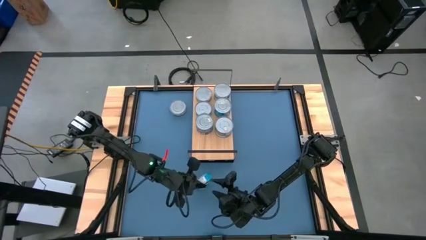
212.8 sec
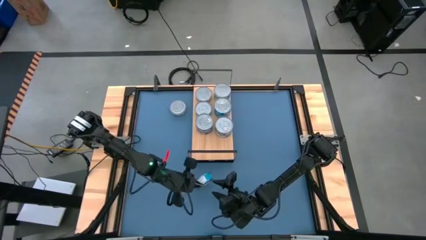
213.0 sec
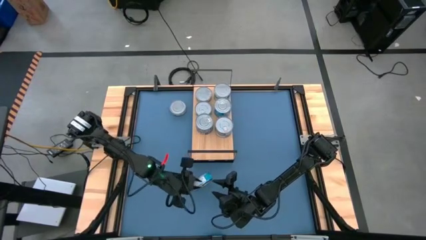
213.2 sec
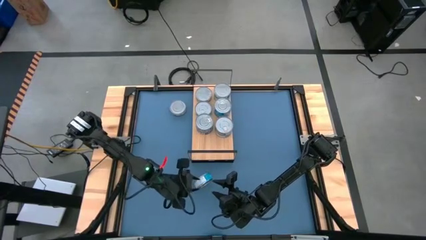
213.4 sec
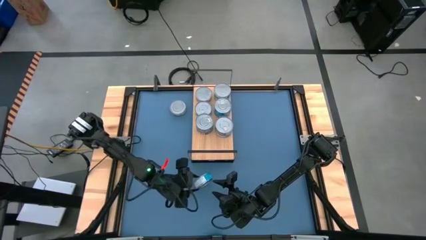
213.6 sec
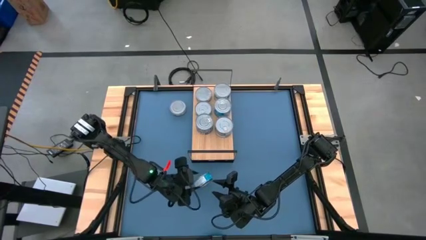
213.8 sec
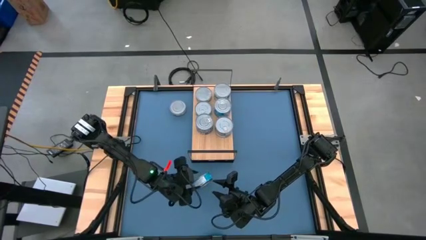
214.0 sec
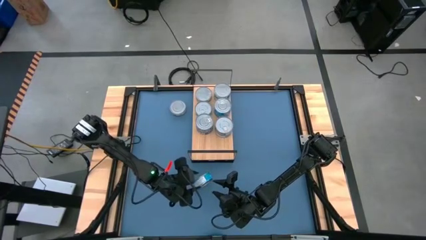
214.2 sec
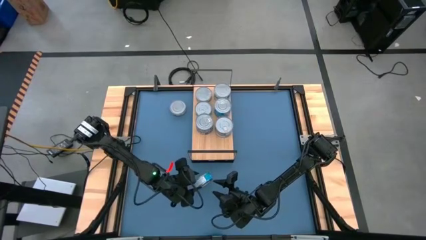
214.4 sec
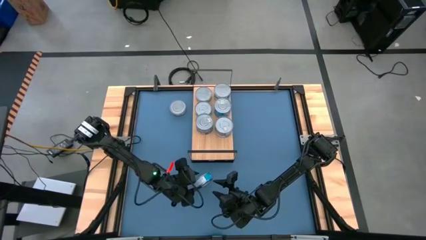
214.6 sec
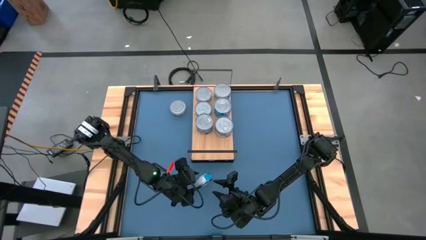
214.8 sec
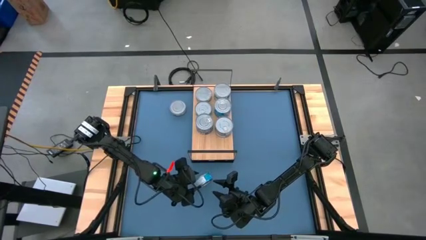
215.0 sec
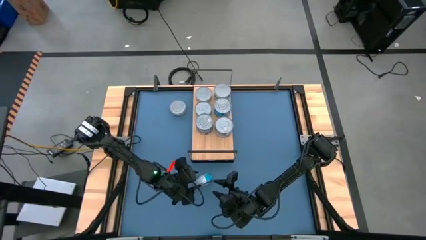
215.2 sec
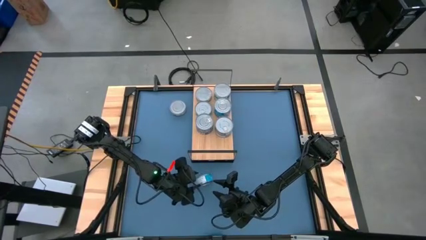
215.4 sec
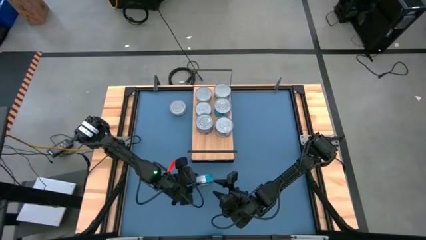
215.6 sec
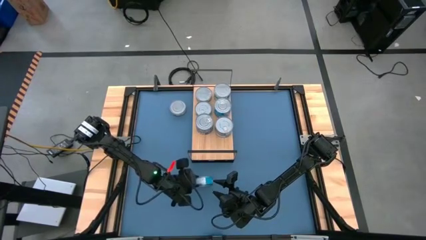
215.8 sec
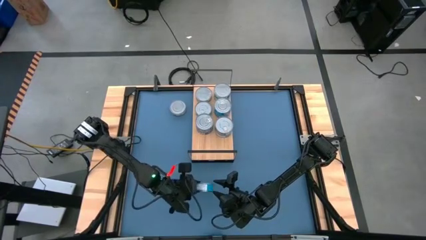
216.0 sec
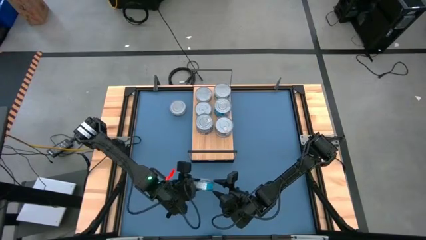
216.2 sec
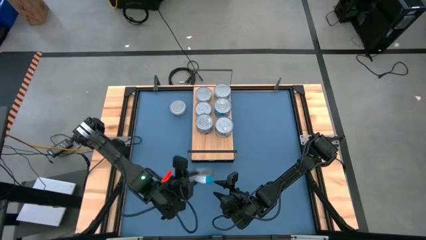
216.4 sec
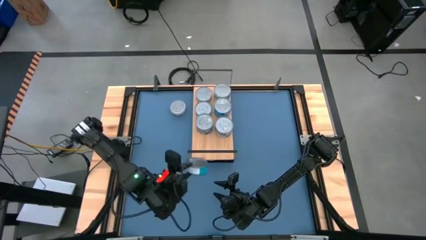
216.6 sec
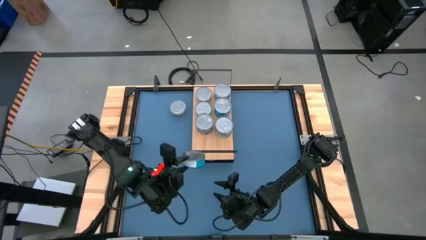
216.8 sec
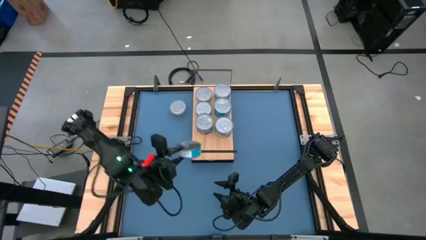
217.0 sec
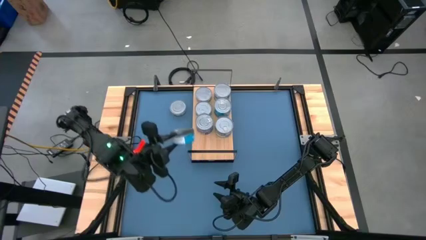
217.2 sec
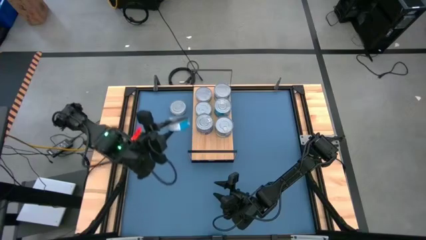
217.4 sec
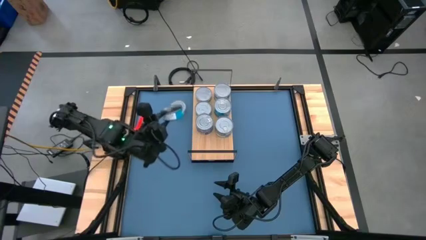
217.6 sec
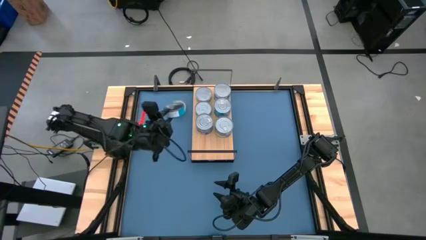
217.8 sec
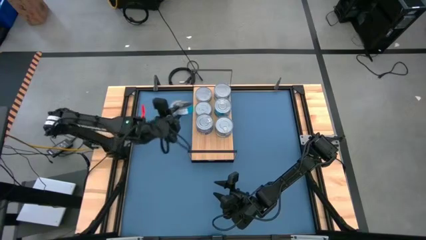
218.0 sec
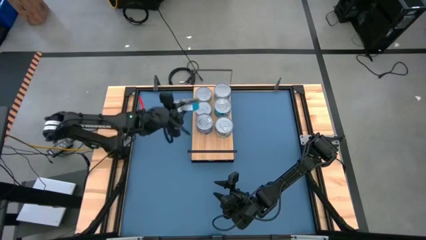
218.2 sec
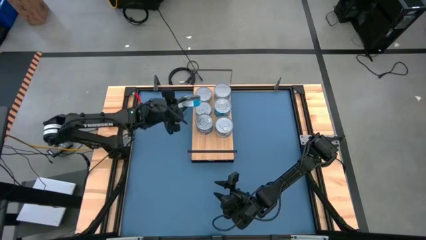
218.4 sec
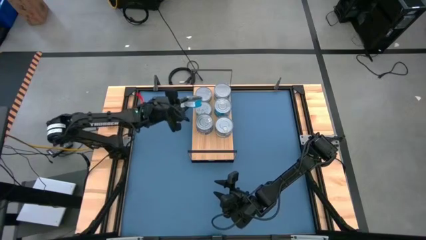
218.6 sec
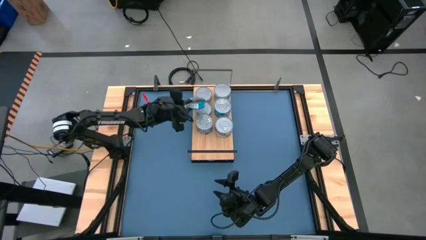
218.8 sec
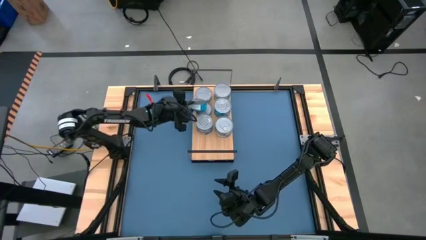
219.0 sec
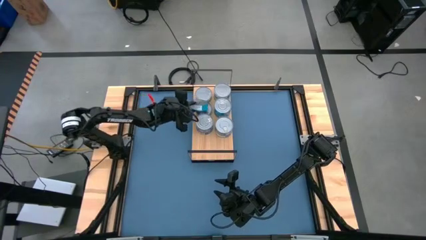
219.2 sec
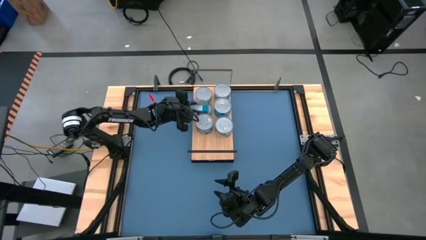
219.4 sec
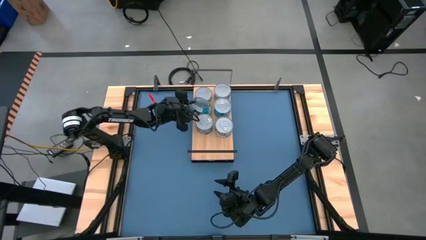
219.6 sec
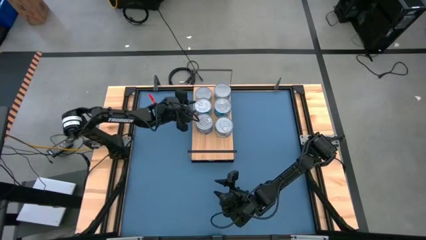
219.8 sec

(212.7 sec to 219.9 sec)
Task: Stack canned seafood by type on shelf
Stack the yellow blue tuna can on top of the other yellow blue tuna can on the shelf

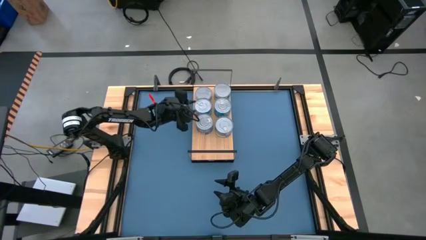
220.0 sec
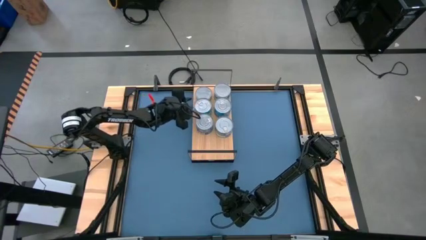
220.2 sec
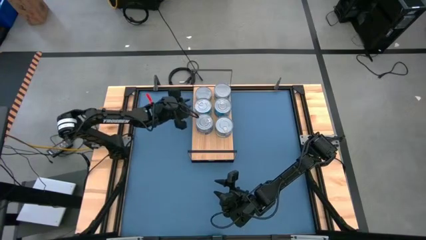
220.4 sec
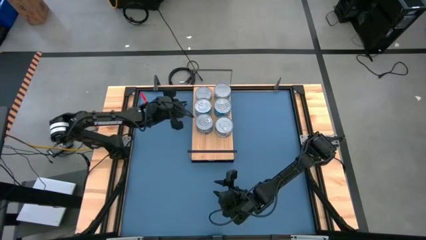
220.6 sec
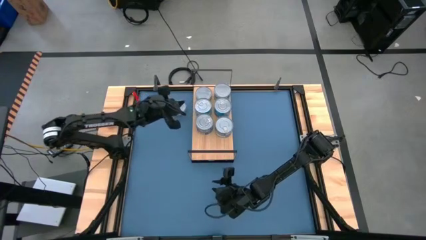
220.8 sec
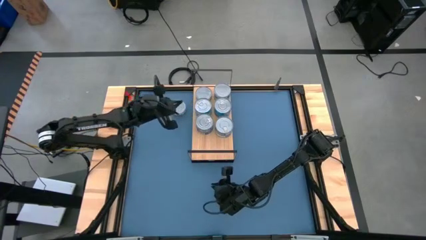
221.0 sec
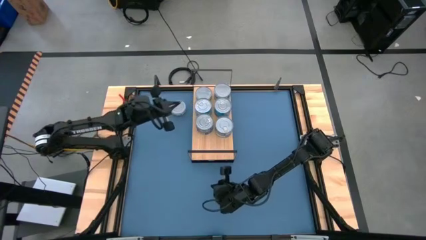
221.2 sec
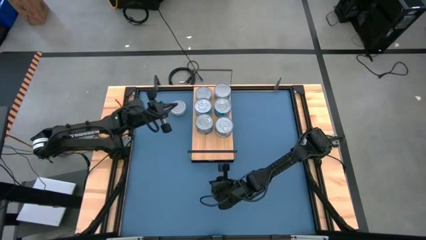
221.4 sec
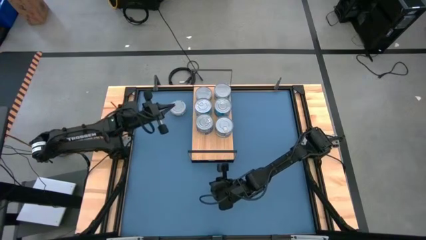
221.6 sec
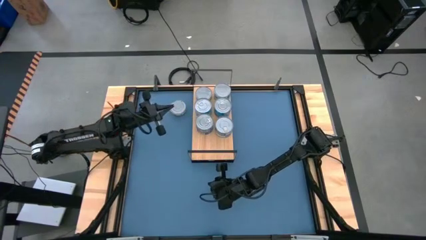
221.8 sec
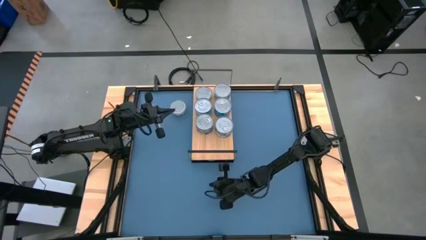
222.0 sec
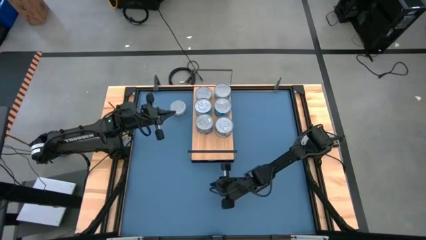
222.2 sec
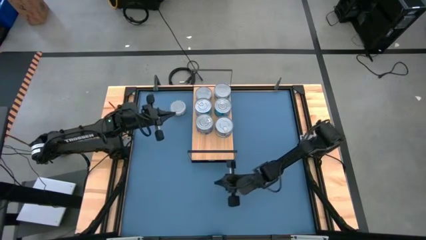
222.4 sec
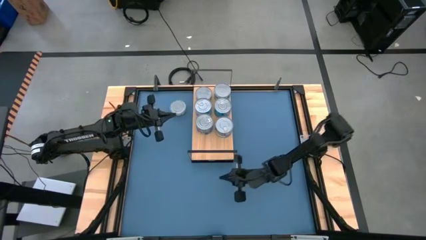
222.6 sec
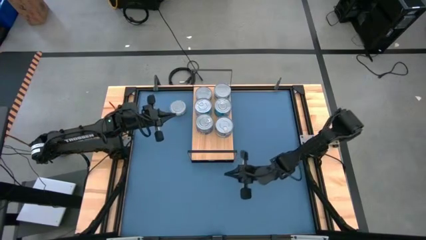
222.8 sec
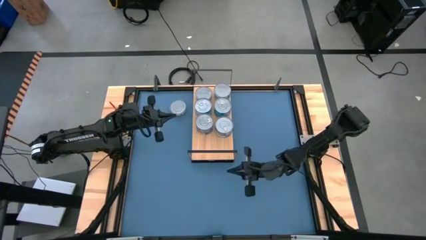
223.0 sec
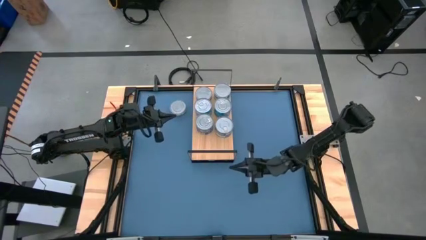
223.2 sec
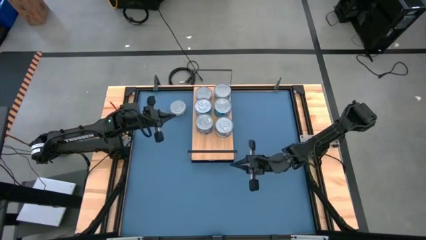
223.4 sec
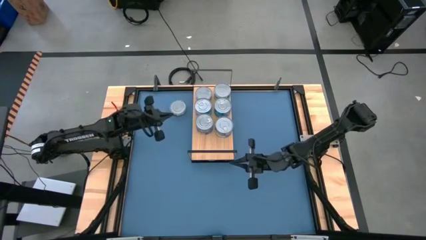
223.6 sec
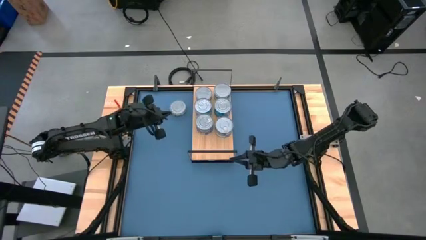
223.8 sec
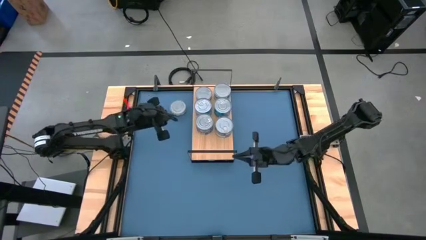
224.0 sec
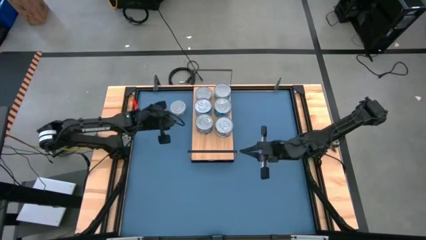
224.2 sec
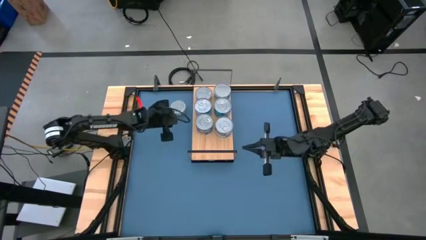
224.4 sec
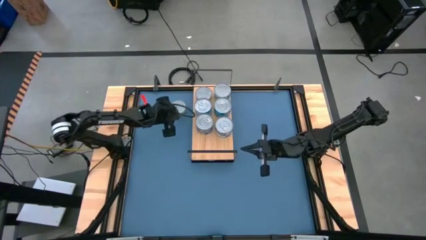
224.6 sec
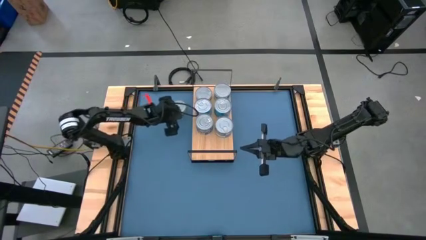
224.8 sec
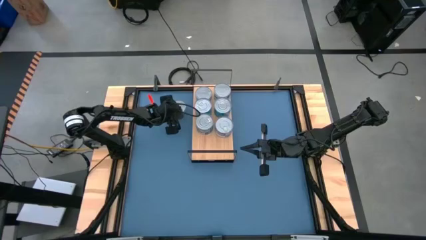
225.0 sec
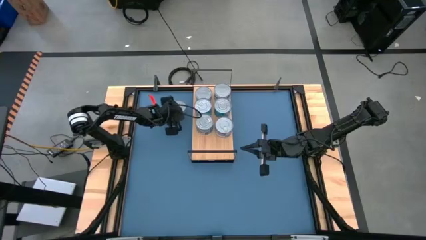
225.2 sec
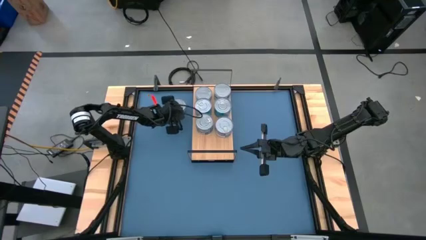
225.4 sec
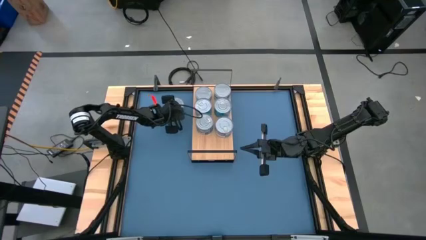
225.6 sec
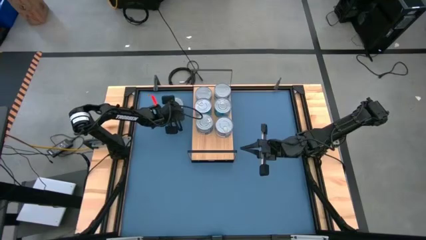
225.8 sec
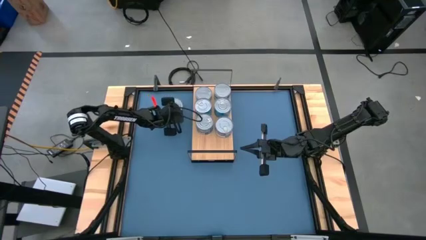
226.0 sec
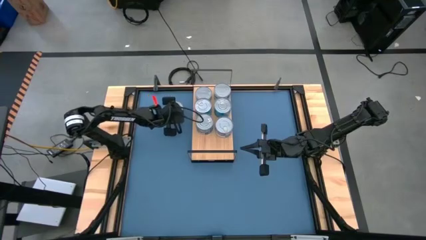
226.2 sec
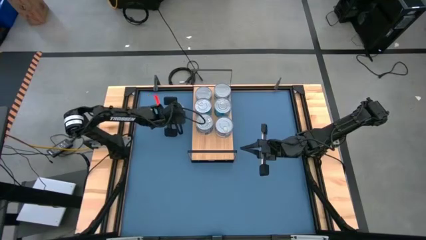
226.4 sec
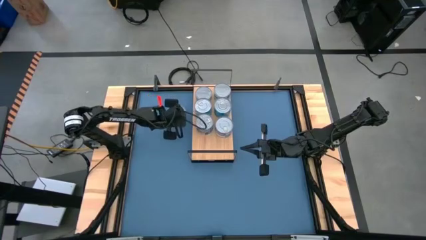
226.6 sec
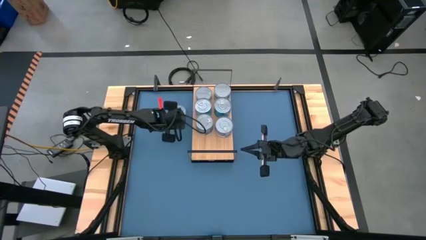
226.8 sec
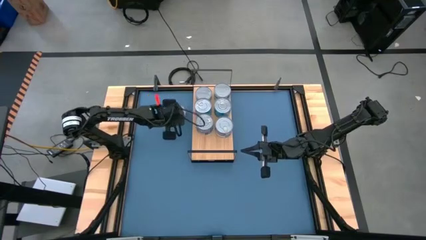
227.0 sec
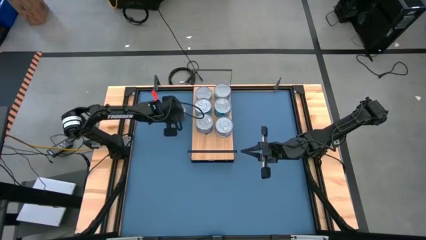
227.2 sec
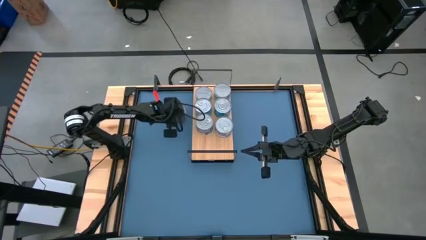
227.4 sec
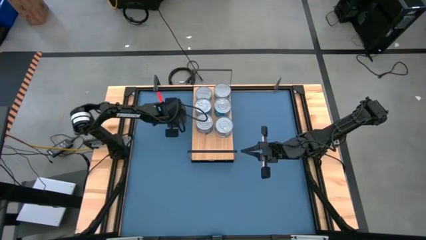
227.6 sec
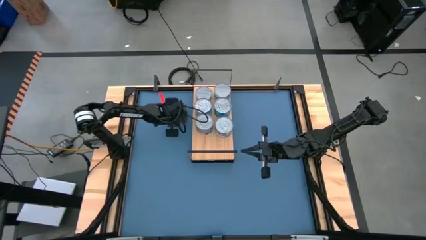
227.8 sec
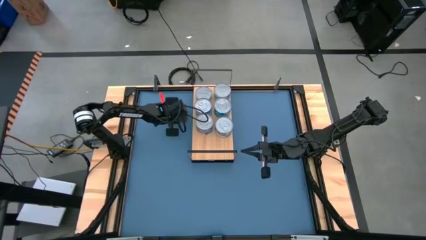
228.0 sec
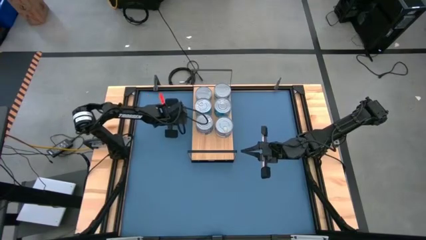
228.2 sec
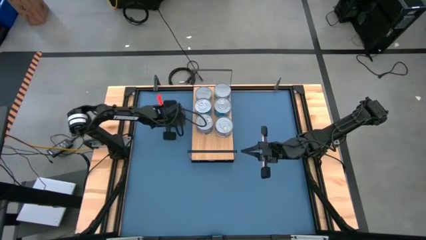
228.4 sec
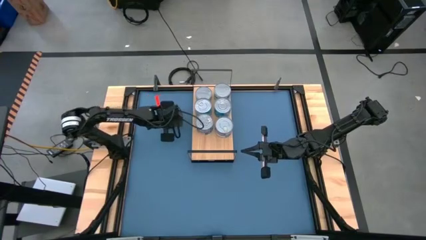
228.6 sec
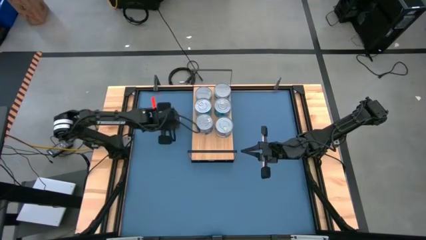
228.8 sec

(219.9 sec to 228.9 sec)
Stack the green tuna can on top of the other green tuna can on the shelf
